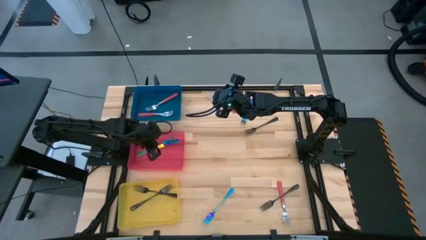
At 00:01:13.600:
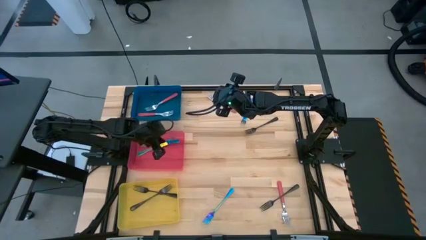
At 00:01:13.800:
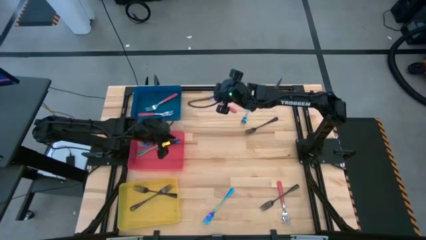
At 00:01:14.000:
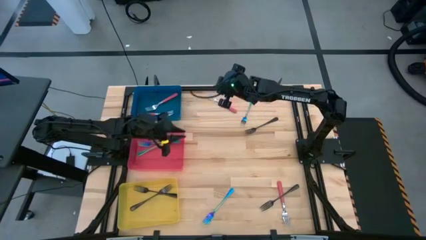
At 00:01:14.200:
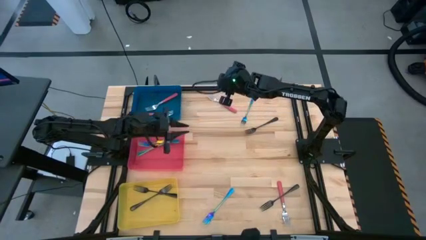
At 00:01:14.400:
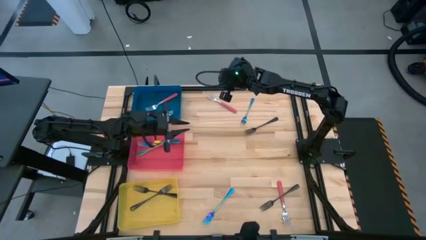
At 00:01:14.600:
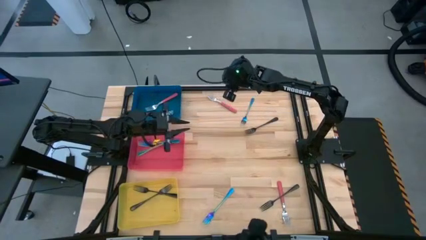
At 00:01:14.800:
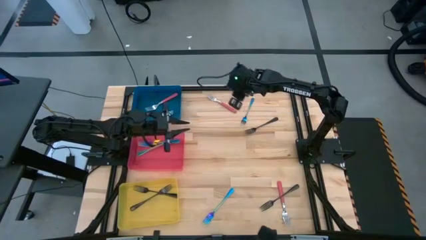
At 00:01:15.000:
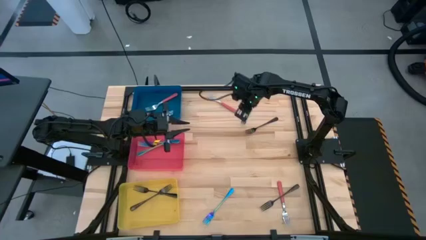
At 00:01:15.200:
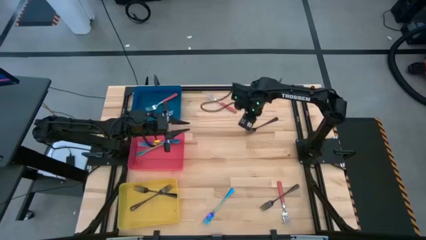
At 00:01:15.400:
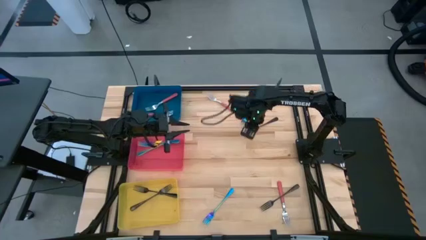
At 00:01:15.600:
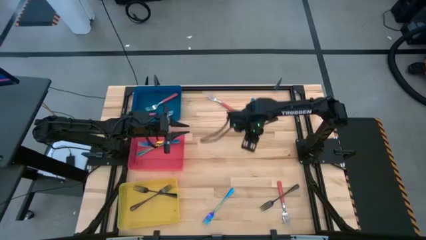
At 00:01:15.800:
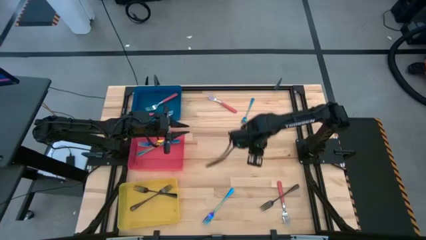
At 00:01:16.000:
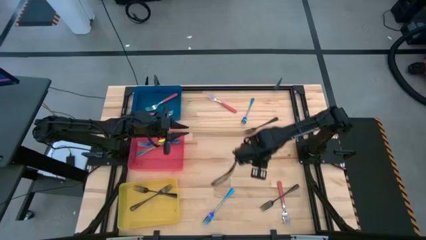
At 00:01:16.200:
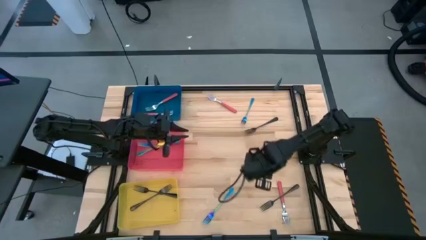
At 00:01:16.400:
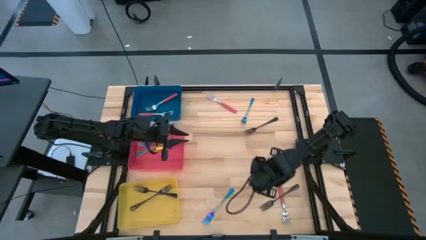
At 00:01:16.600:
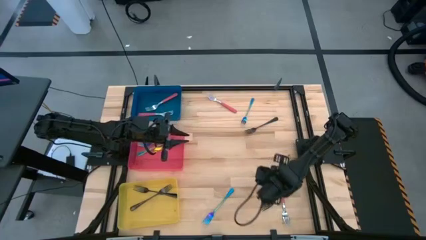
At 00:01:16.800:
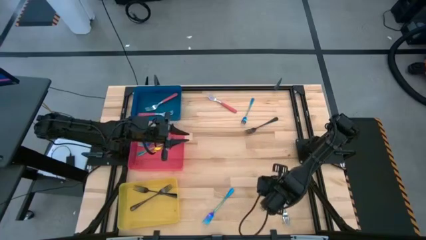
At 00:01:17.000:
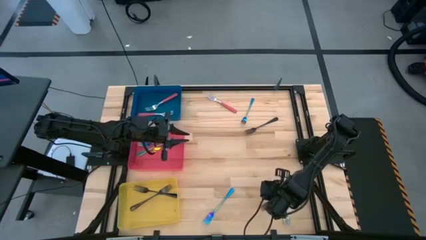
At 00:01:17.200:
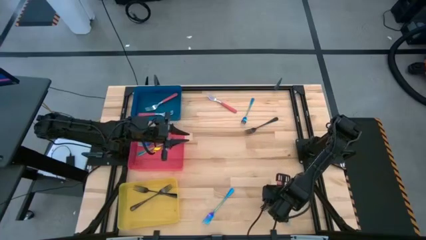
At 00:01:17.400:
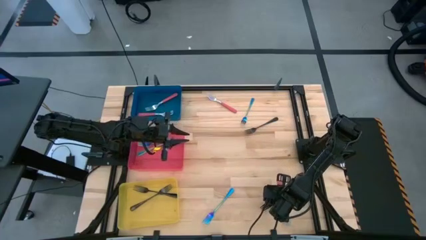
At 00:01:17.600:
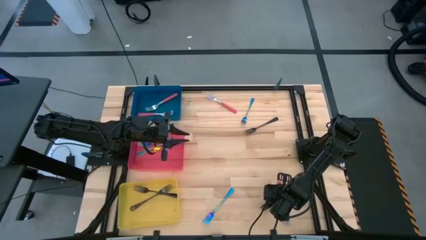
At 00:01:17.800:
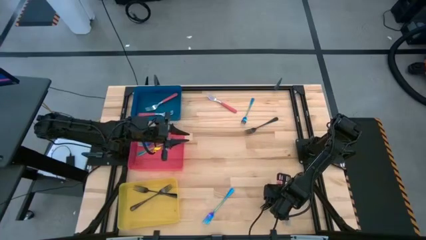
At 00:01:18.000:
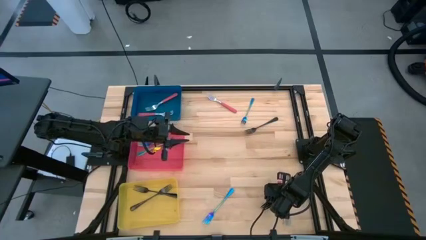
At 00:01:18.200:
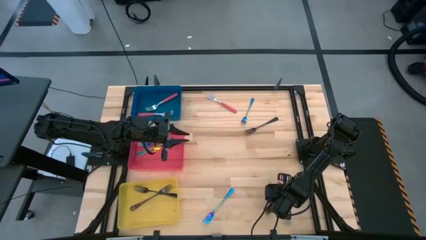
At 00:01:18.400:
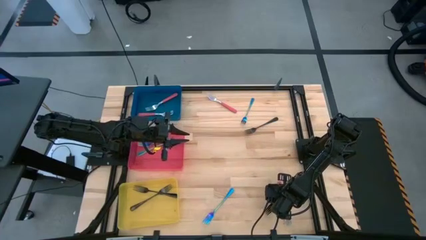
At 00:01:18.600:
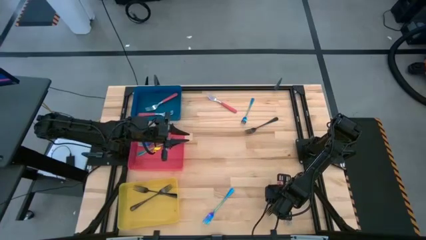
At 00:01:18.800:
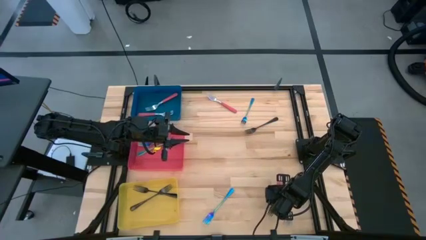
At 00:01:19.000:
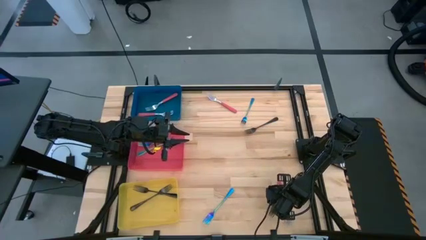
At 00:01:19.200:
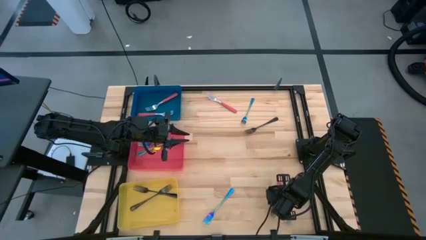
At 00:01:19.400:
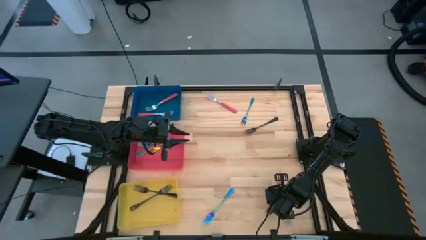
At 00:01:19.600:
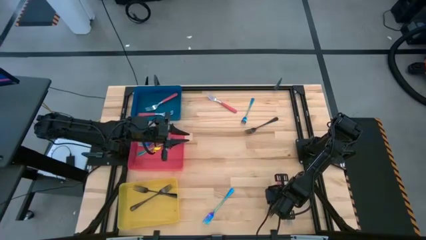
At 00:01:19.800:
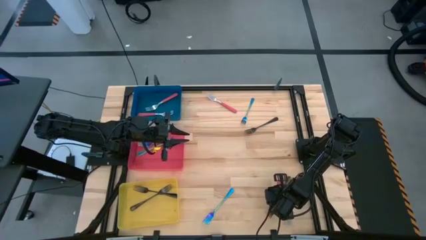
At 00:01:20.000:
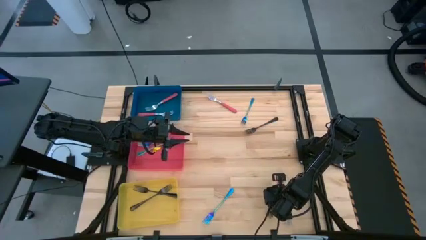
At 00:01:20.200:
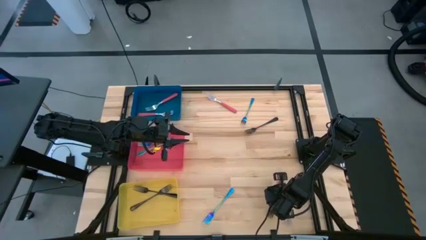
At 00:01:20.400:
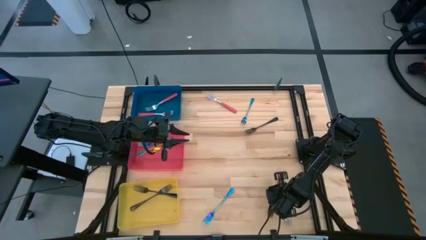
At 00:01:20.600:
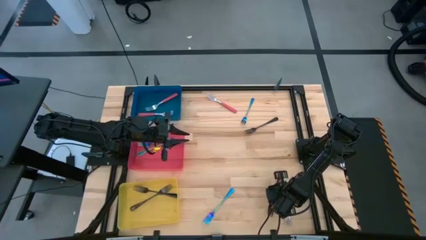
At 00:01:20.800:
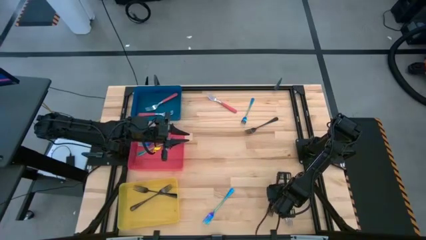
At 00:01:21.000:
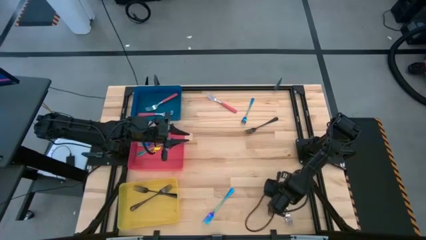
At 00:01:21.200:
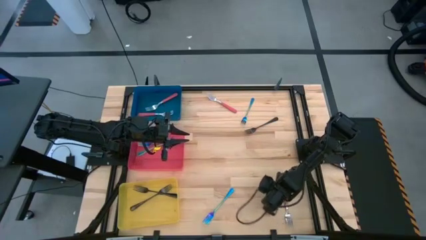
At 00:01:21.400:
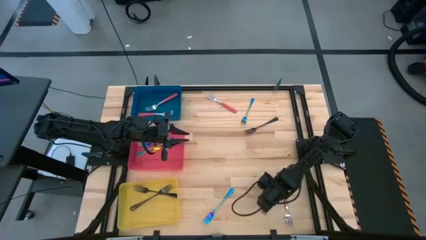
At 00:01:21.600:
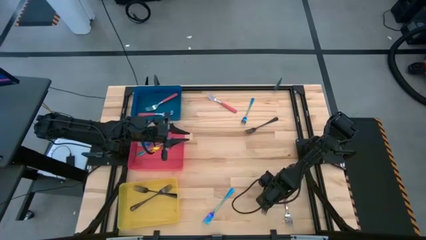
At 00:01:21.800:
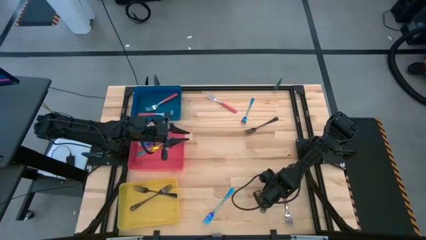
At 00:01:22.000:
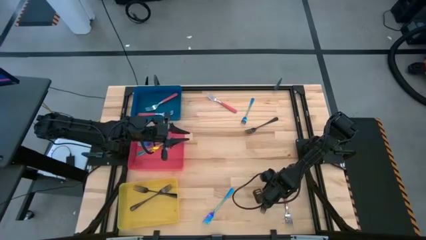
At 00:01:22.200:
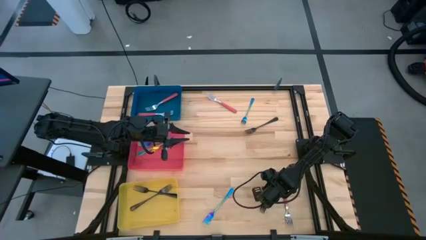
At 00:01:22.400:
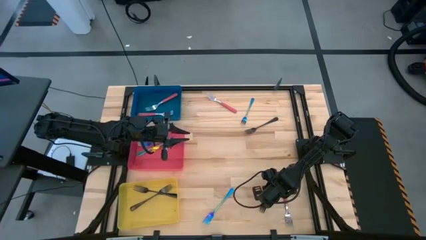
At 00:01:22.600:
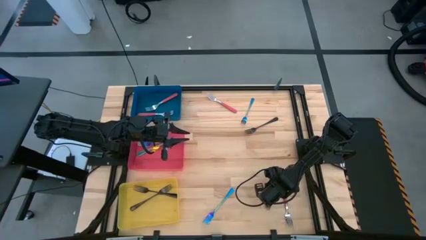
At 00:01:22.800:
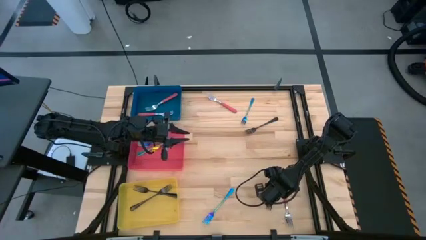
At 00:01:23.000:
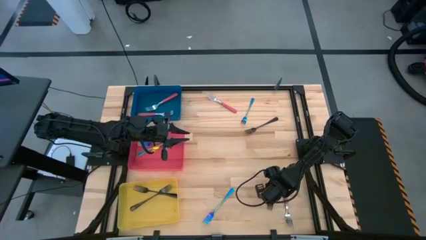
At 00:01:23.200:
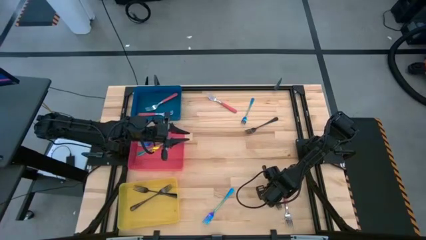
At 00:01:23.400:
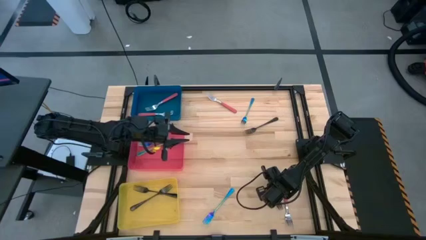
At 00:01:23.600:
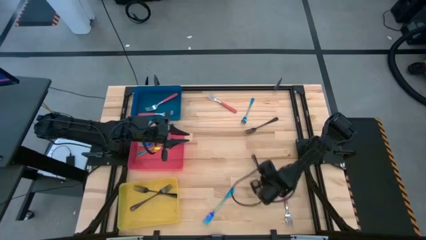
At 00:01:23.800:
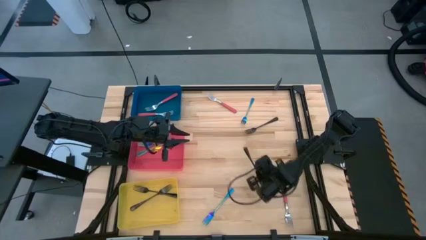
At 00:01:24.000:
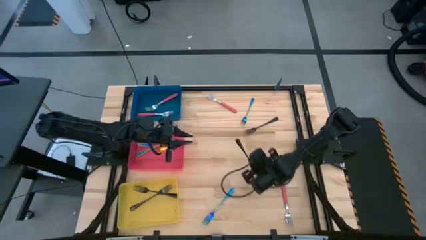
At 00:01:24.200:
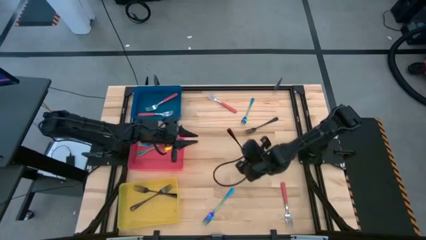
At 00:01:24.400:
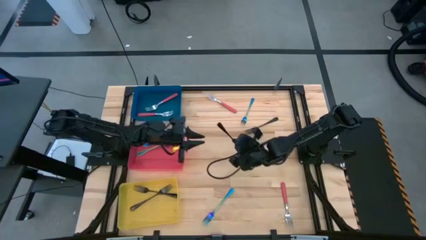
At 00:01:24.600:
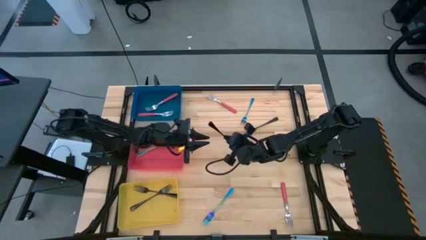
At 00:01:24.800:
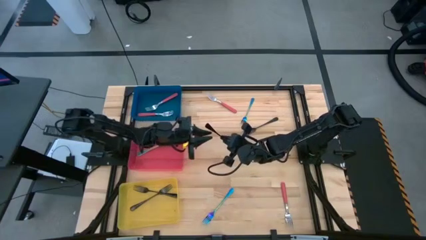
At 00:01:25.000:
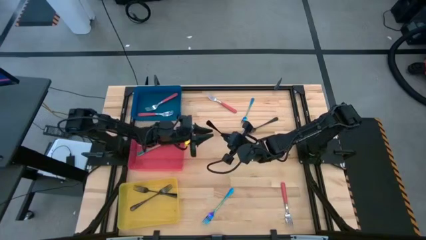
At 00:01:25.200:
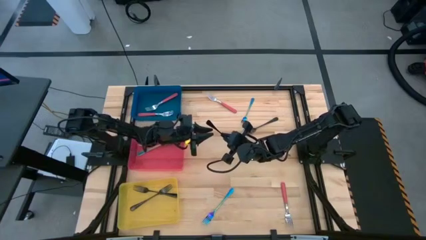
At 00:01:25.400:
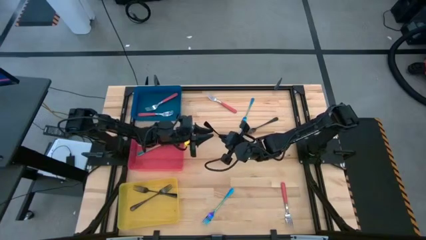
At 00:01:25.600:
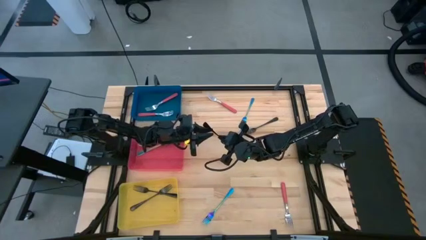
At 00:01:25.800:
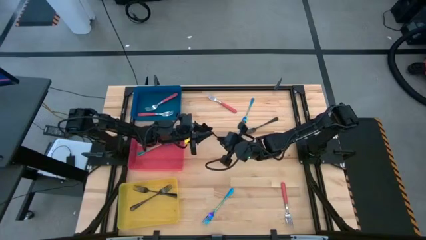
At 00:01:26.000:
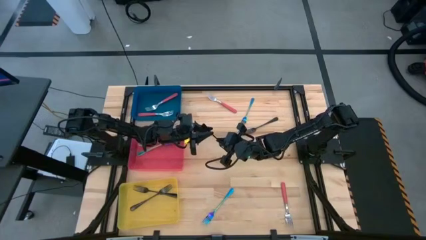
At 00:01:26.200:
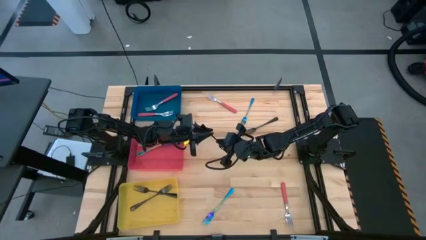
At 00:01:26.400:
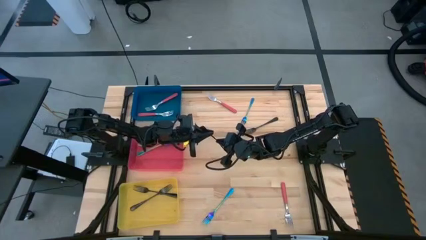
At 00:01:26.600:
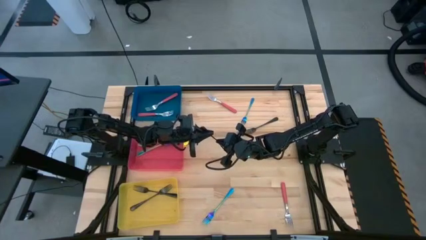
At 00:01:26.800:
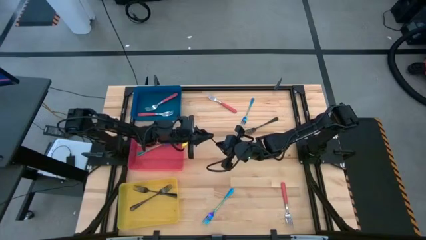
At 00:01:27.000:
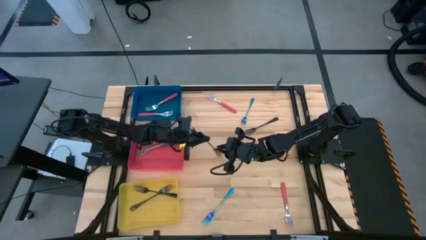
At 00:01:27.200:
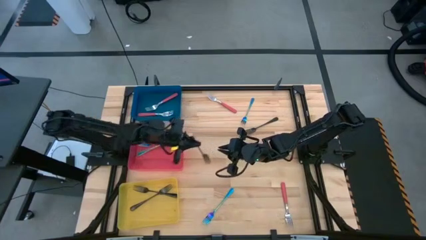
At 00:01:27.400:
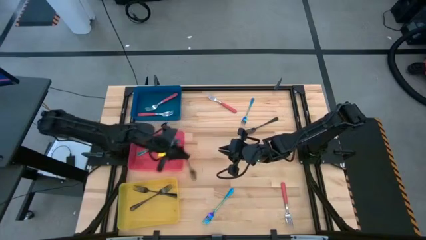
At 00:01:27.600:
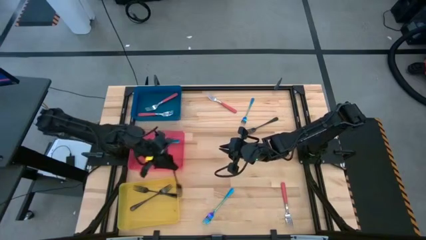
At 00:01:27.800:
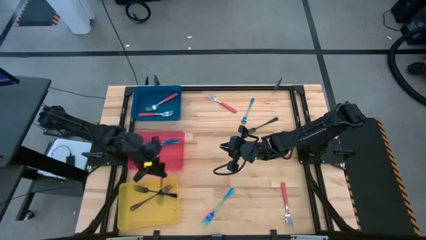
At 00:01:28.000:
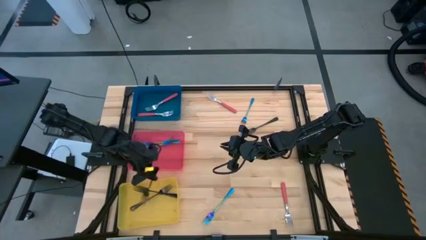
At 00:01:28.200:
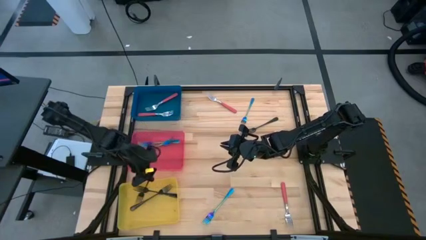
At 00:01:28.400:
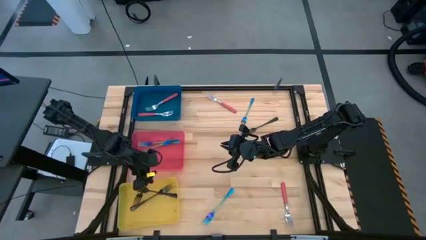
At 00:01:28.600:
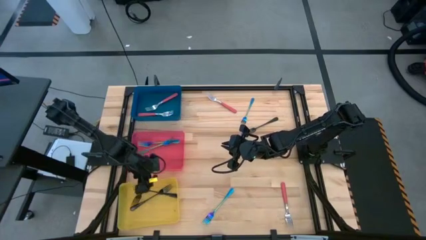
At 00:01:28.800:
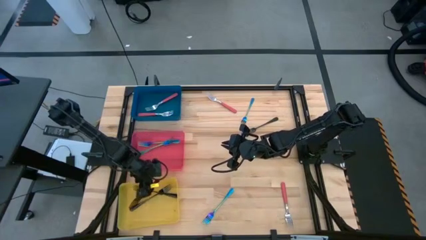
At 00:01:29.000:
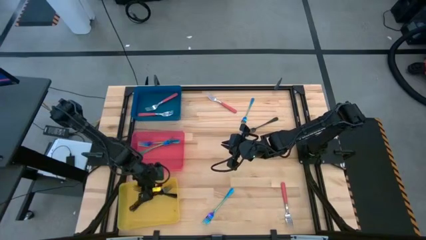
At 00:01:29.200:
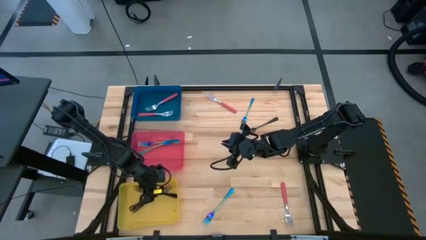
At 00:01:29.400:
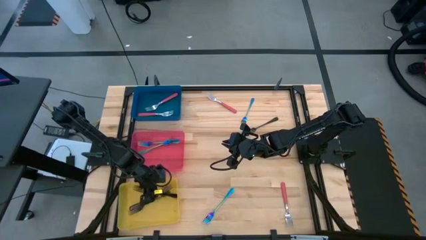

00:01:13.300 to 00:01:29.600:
Task: Sort silverware by color (type)
Put the black fork into the yellow bin

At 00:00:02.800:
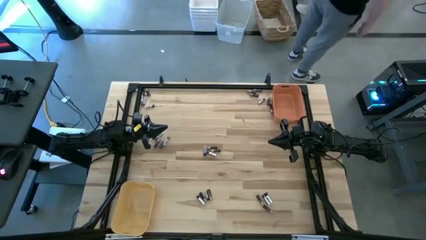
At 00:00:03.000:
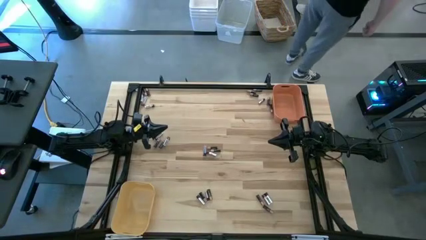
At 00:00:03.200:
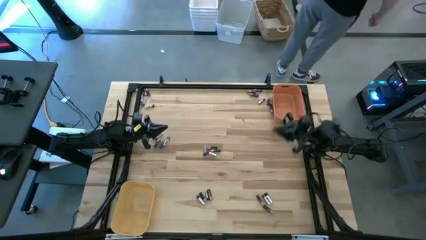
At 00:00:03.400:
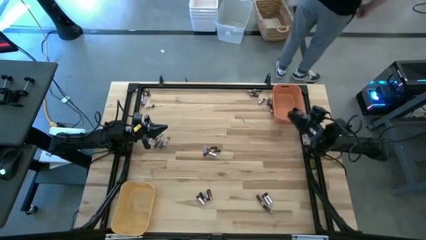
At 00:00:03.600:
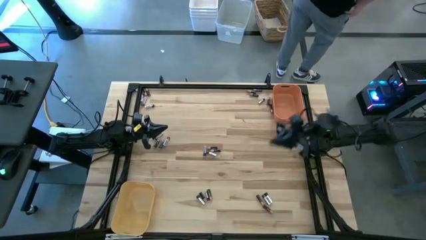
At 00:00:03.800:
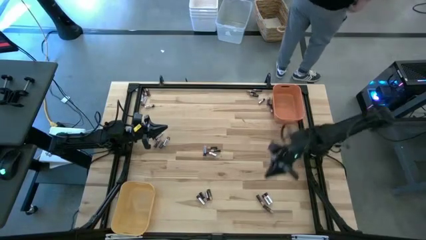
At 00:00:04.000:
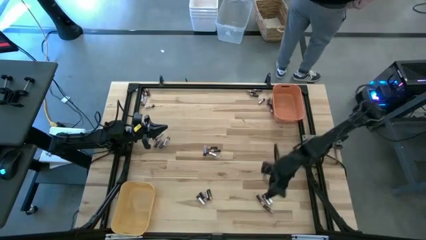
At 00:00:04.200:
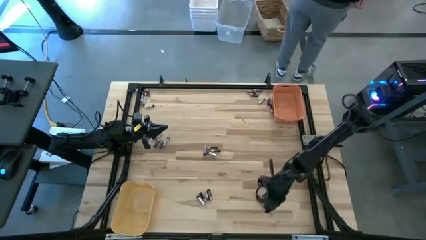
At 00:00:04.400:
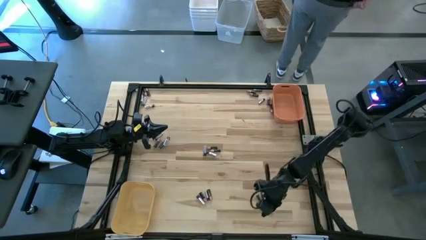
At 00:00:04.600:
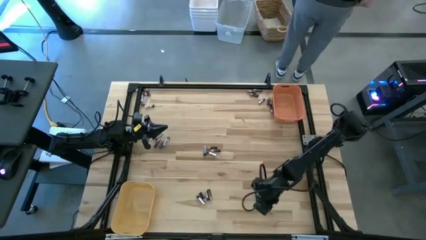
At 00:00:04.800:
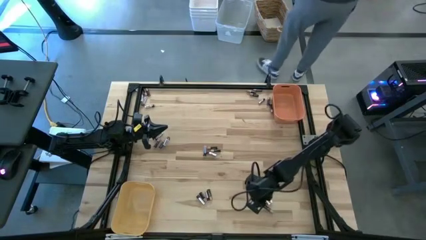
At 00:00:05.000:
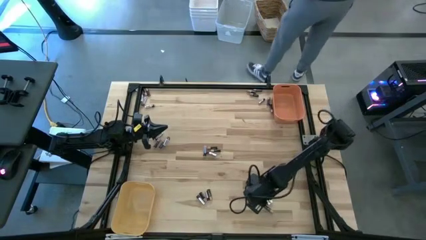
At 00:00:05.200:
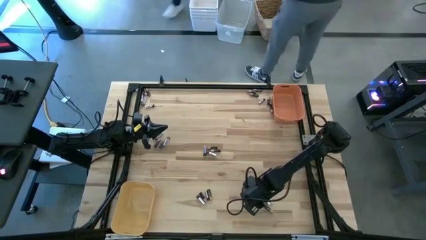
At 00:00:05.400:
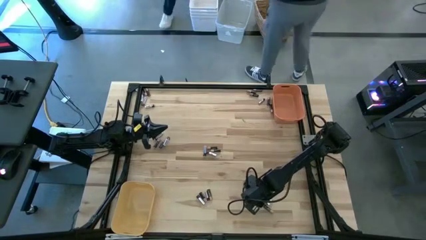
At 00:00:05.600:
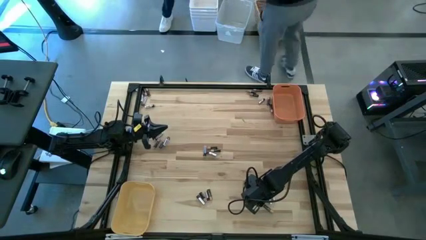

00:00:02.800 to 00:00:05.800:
Task: Sort batteries
Put the black battery into the orange bin
